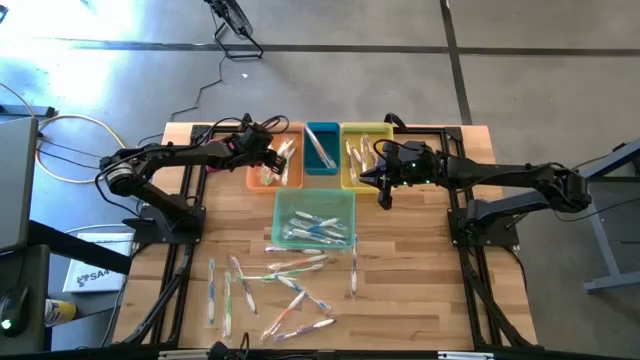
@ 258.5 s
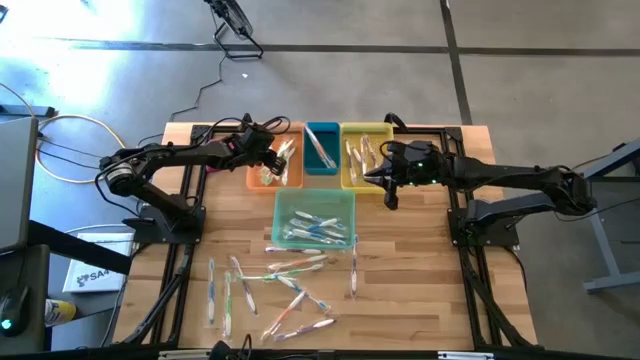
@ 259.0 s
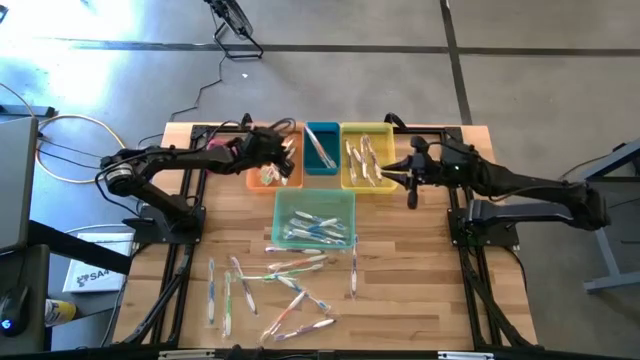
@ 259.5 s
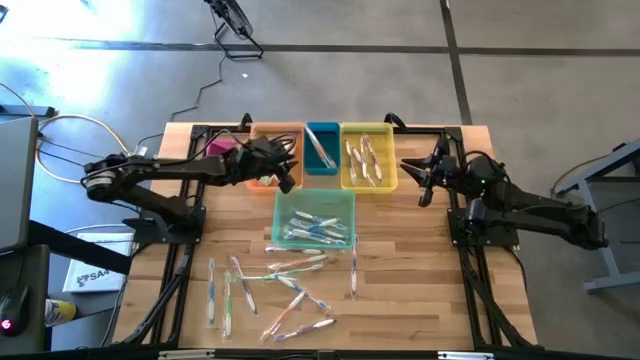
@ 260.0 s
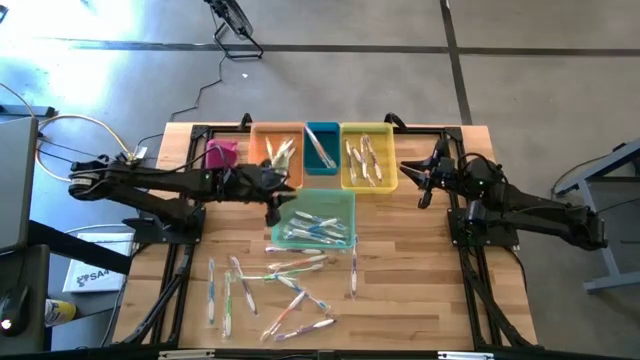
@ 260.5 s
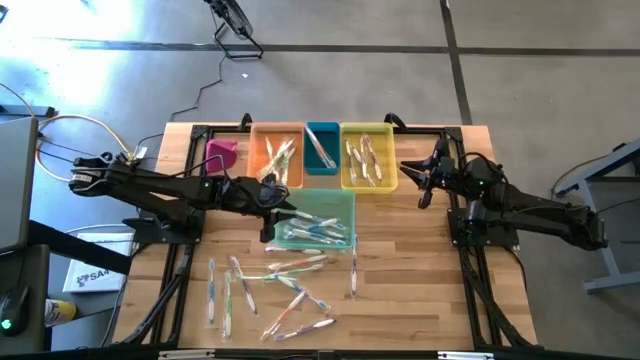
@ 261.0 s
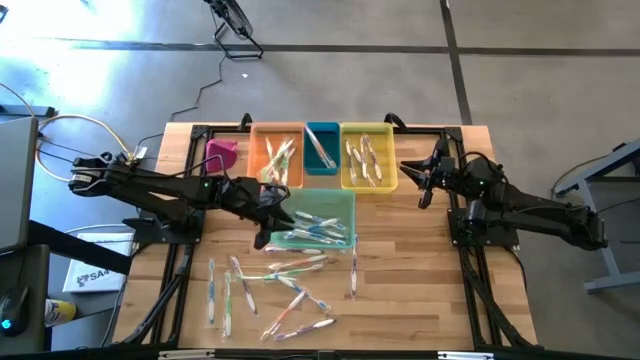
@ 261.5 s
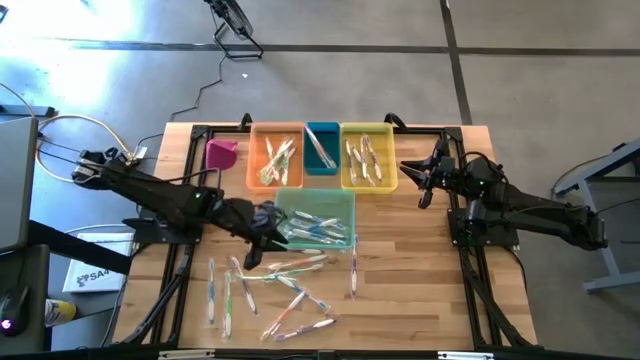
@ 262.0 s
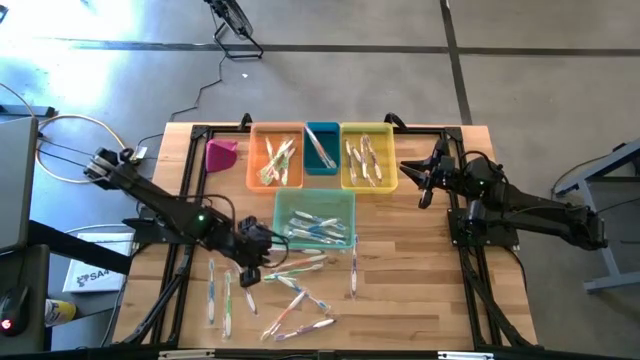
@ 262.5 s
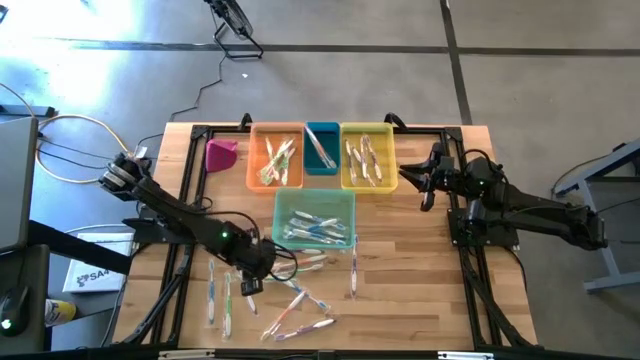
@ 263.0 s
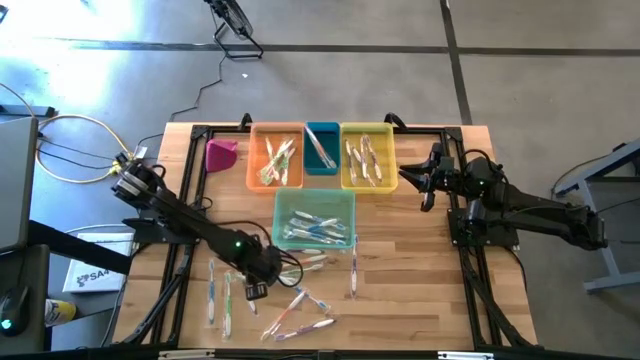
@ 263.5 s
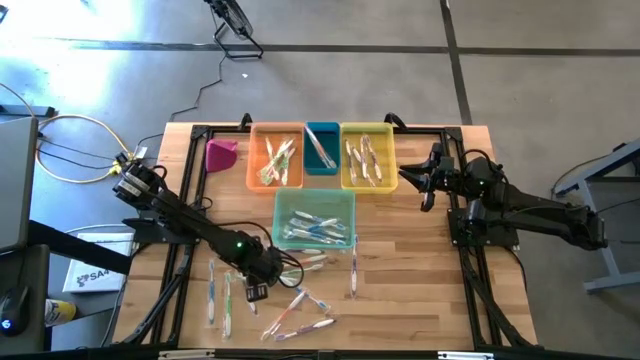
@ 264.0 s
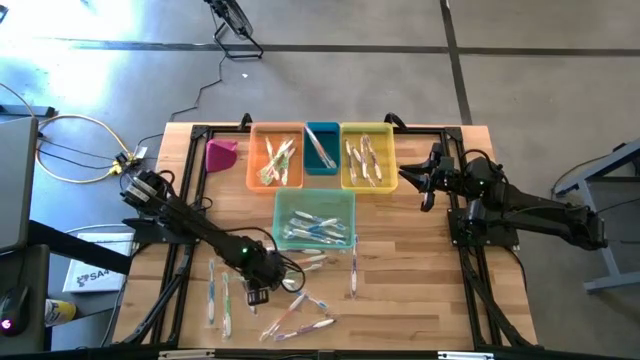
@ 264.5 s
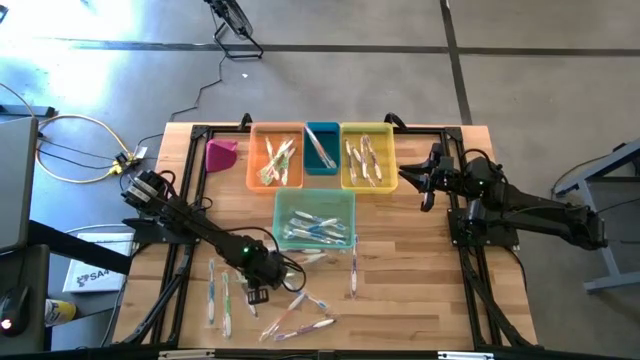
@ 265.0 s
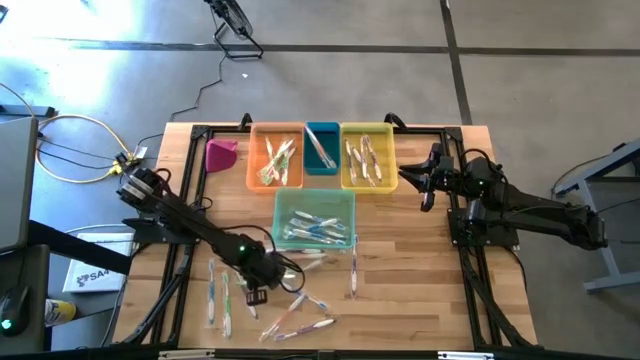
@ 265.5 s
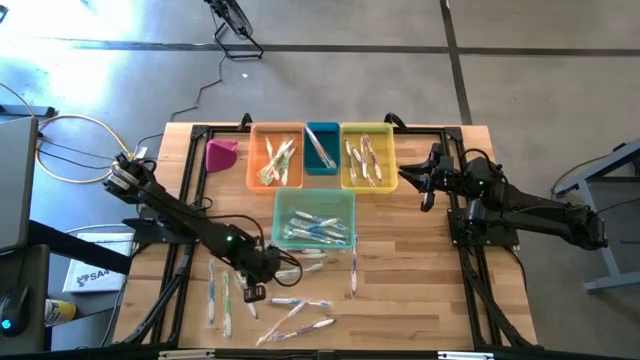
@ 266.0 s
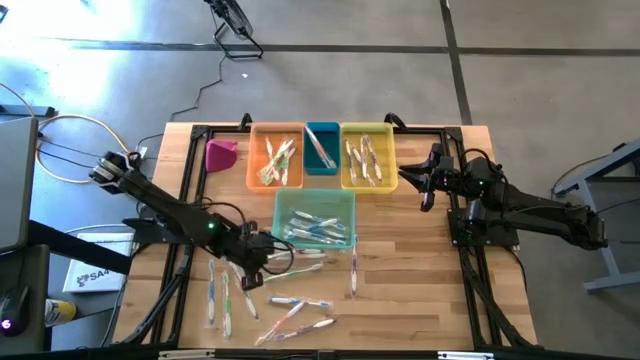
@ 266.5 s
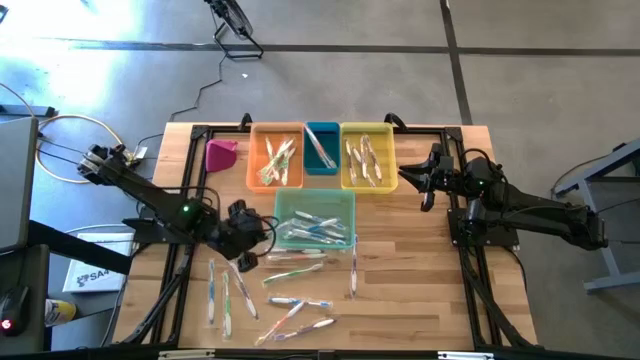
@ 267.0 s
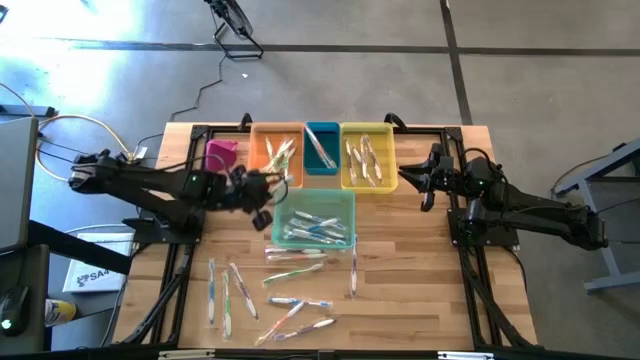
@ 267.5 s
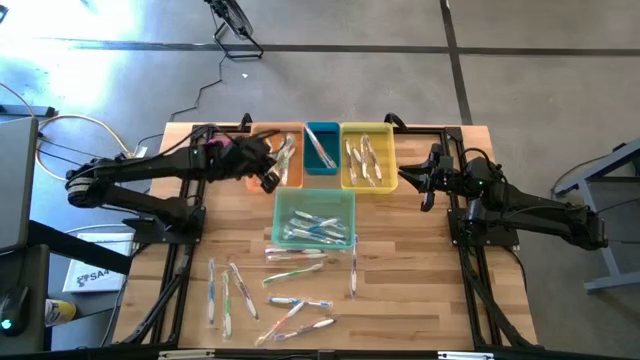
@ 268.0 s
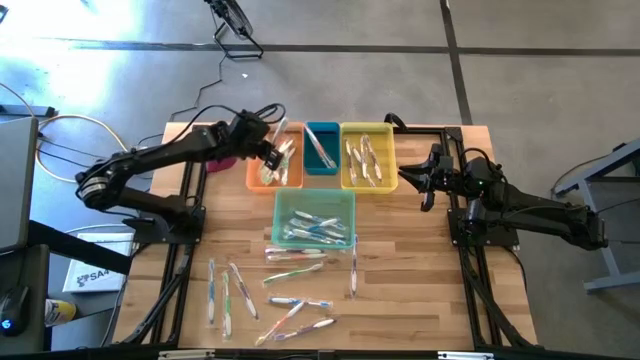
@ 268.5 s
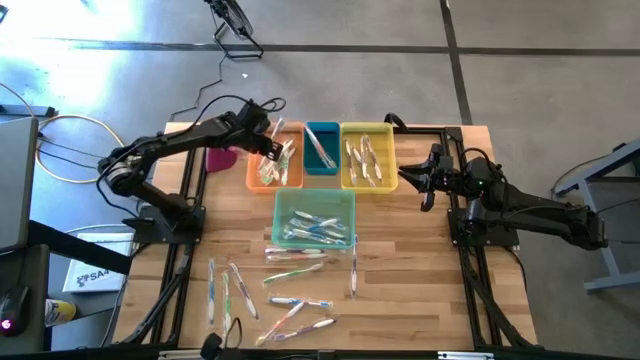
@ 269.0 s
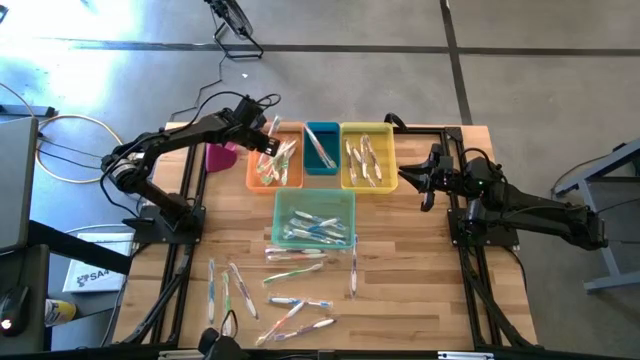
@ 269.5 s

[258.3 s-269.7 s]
Task: Pick & Place Toothbrushes
Put the green toothbrush into the orange bin

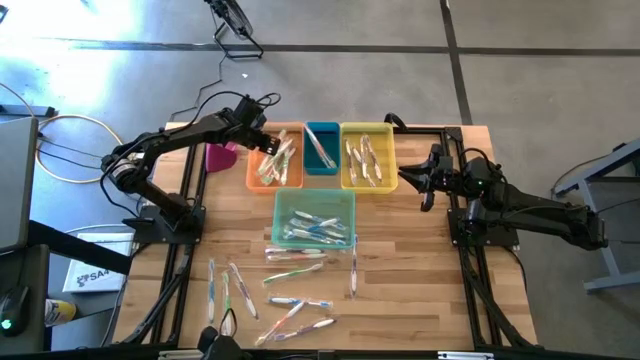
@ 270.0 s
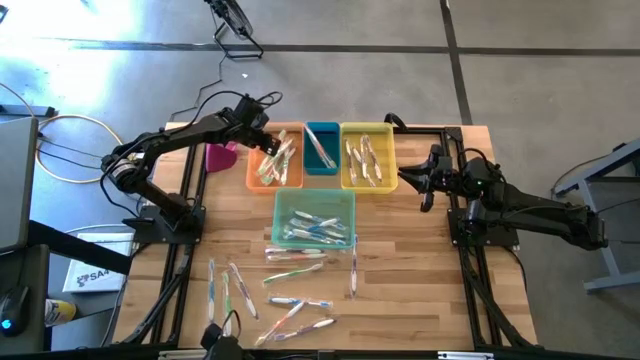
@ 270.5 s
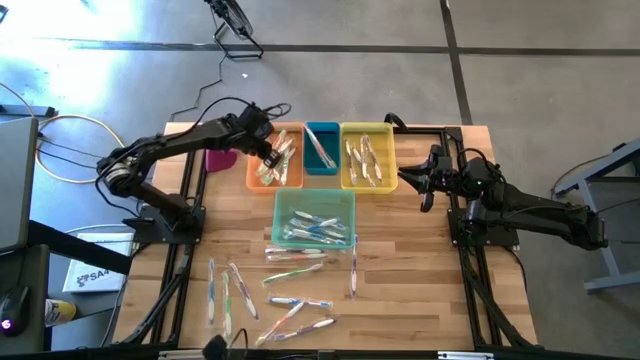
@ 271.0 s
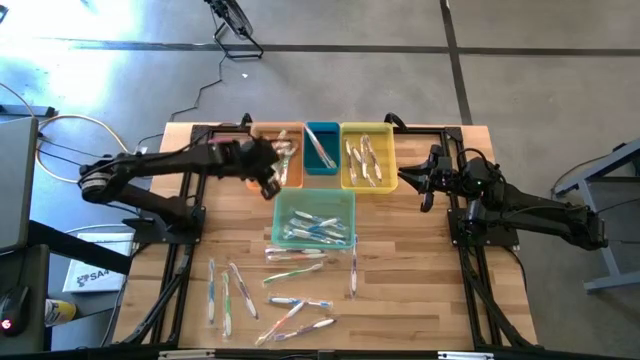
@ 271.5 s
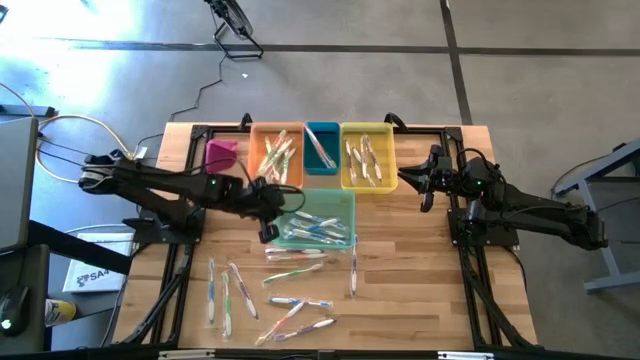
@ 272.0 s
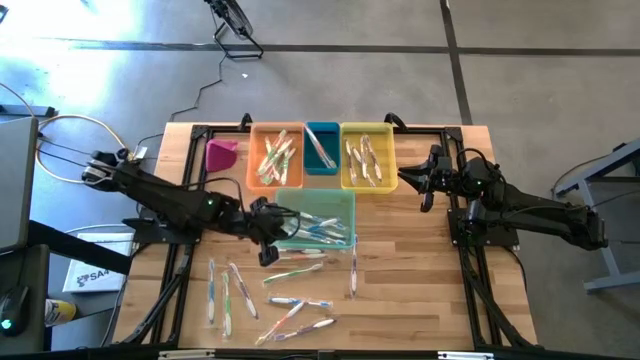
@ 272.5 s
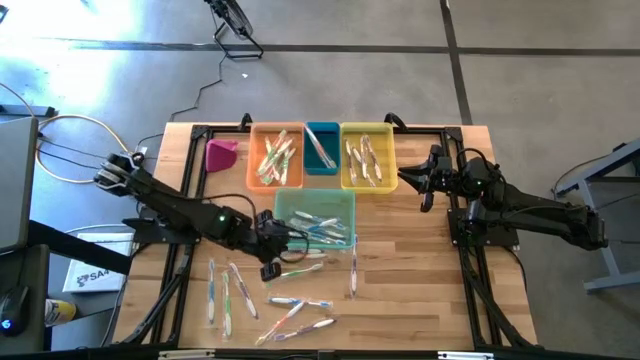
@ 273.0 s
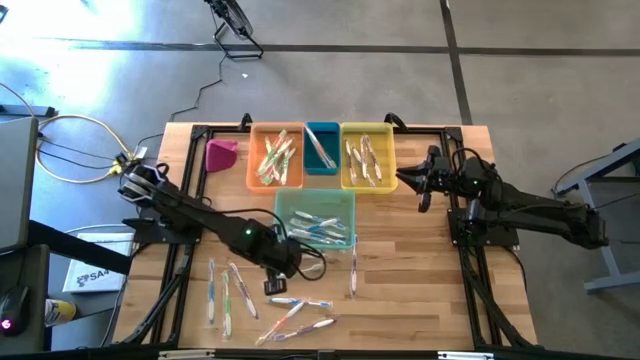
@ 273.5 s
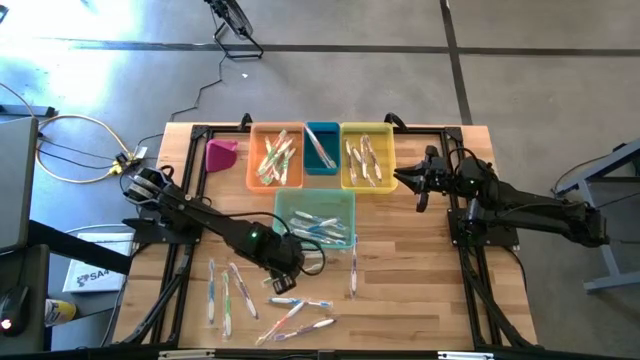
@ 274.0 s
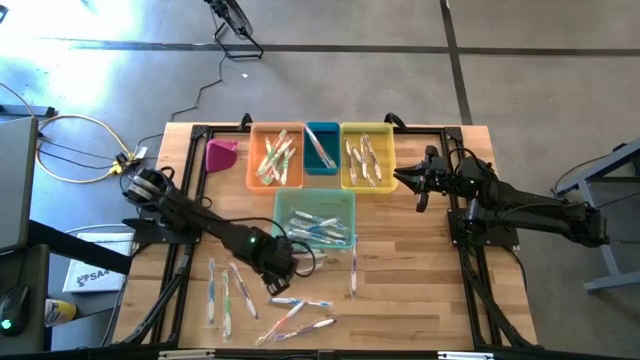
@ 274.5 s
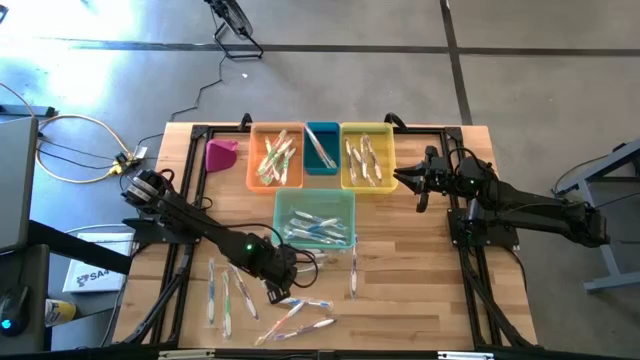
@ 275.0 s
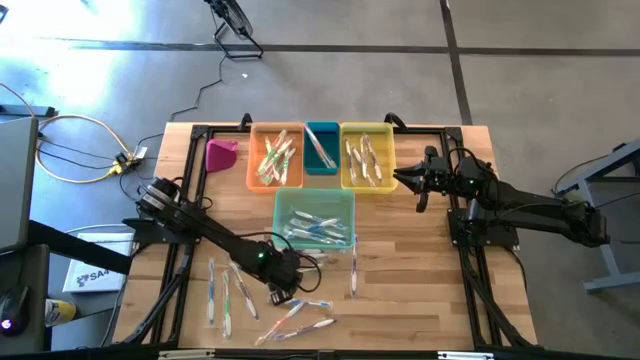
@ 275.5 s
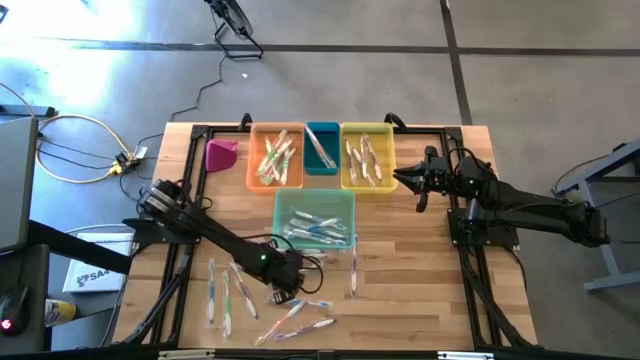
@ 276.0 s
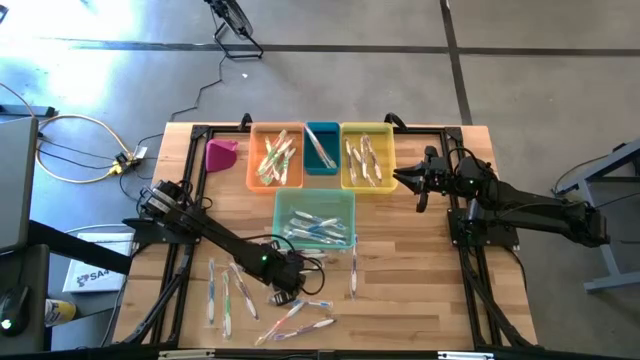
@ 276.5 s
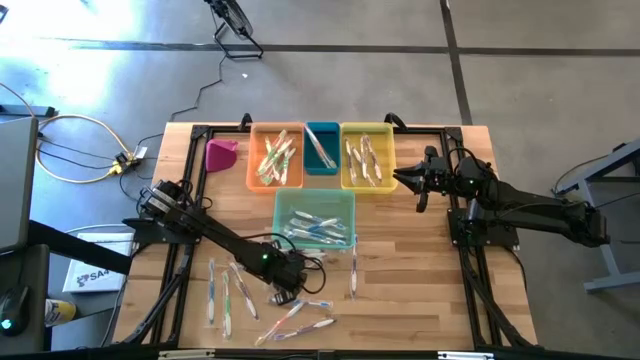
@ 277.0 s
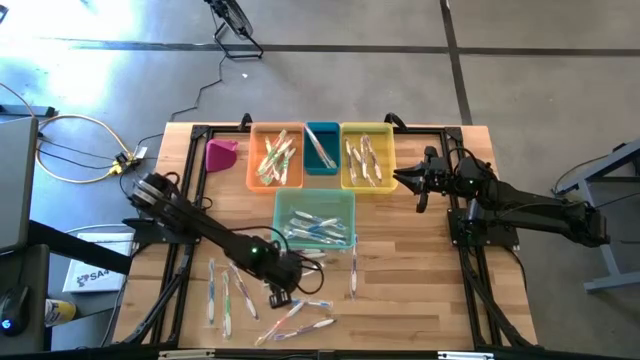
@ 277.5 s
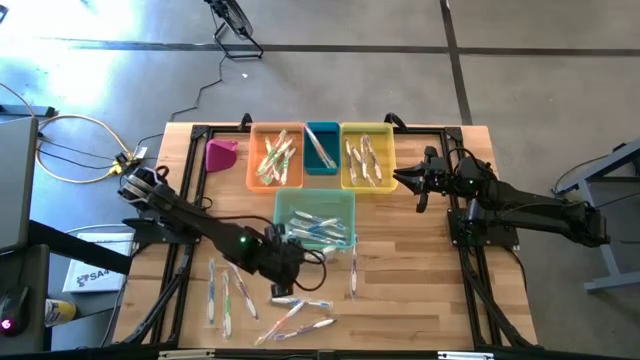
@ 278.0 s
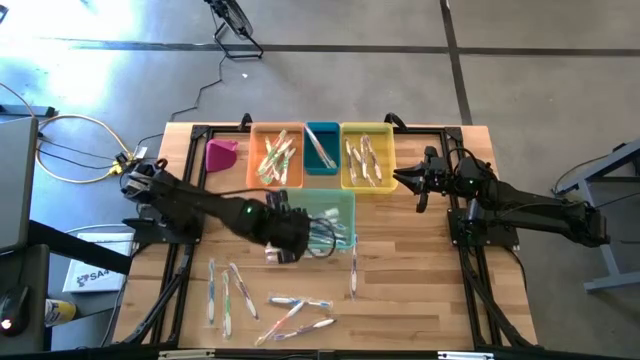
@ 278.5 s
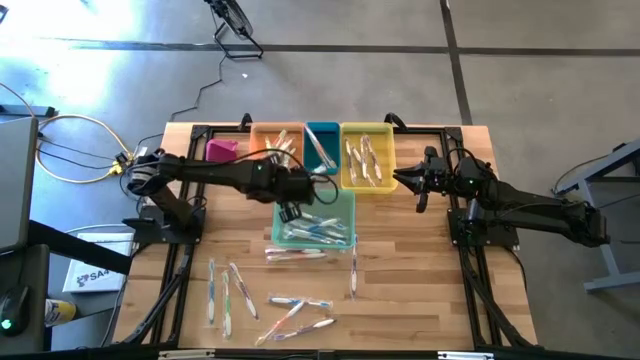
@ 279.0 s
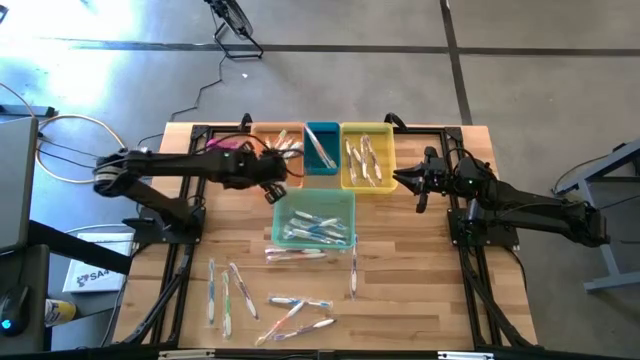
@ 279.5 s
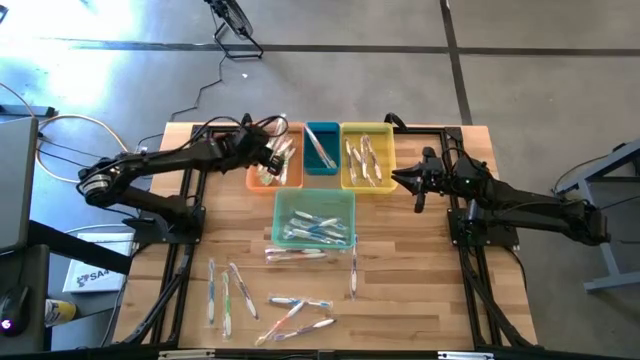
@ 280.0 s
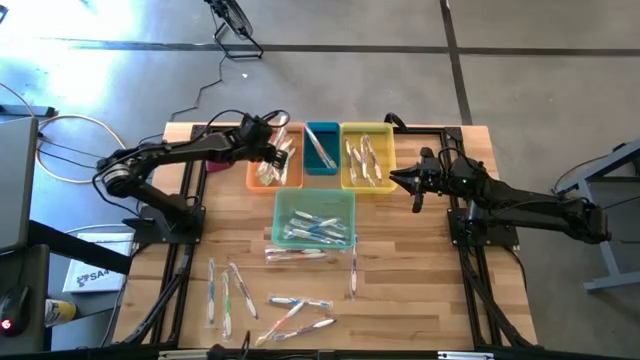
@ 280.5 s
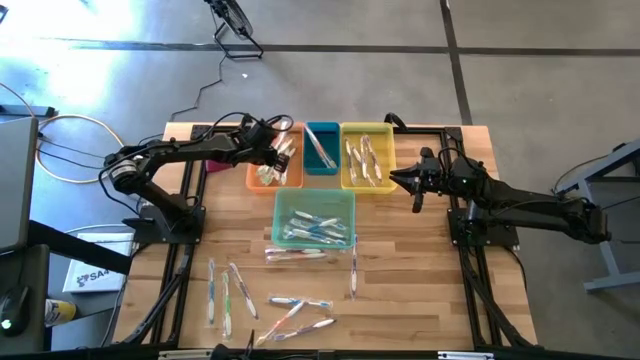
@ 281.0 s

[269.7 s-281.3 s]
Put the green toothbrush into the orange bin
